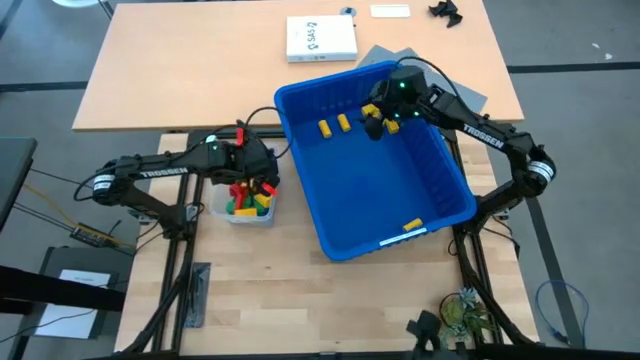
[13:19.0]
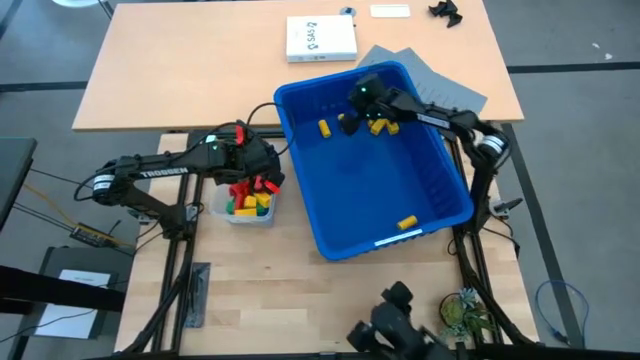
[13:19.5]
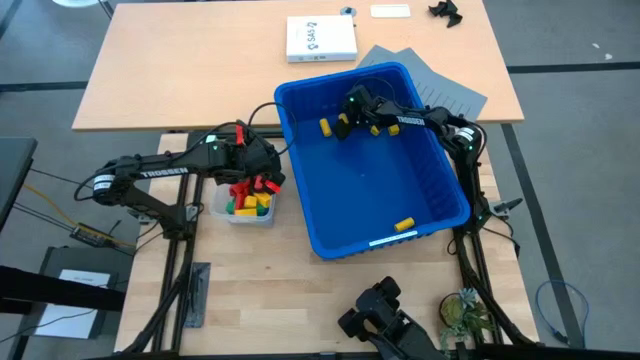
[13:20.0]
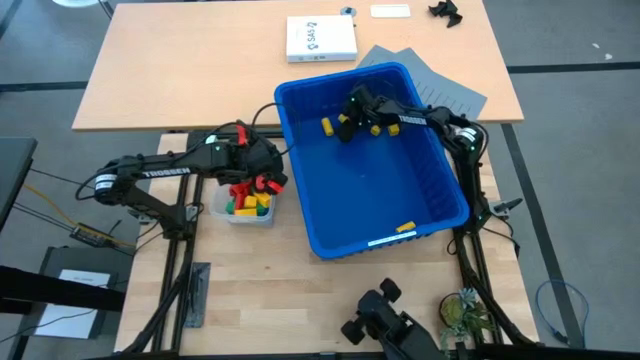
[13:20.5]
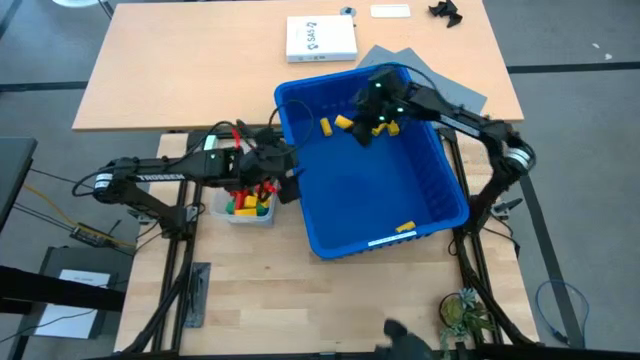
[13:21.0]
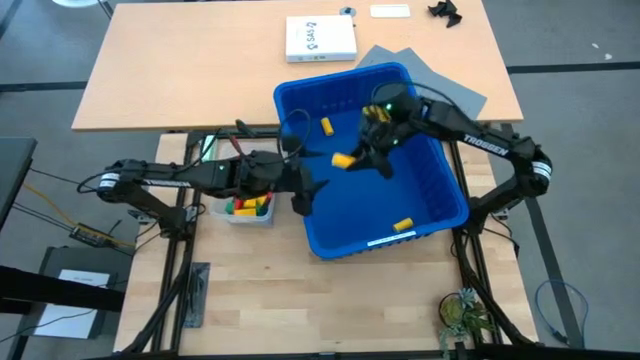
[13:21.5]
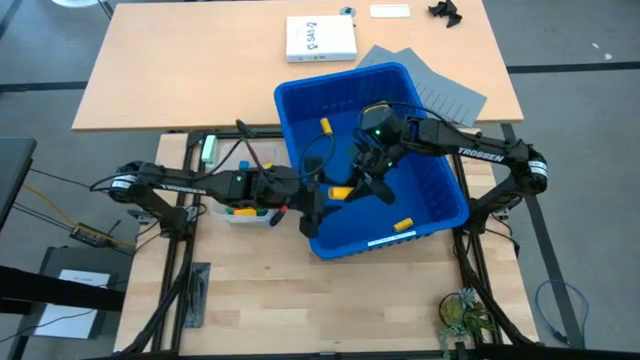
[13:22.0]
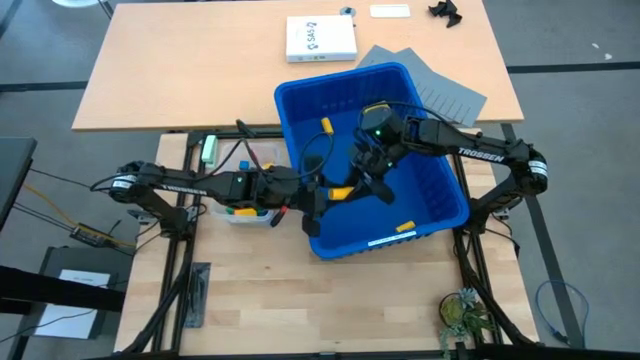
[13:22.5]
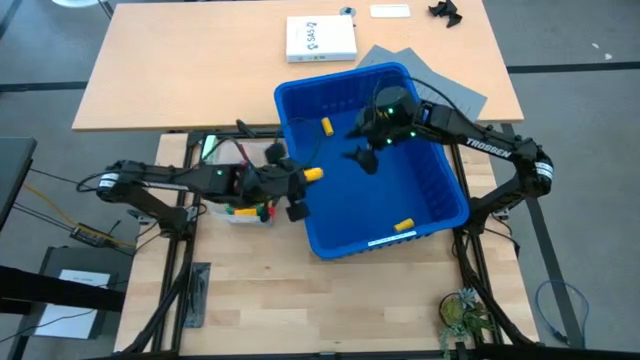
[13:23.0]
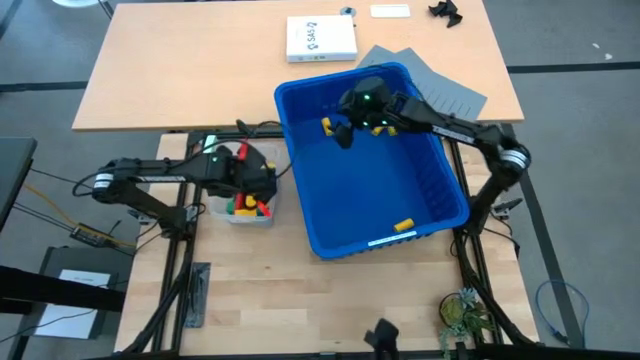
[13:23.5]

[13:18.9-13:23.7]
Task: Sort blocks
Put the yellow block into the transparent bin

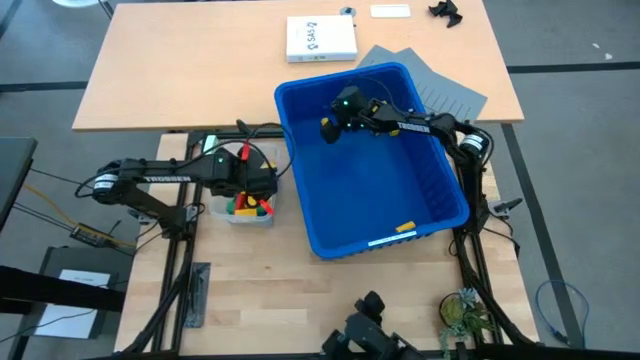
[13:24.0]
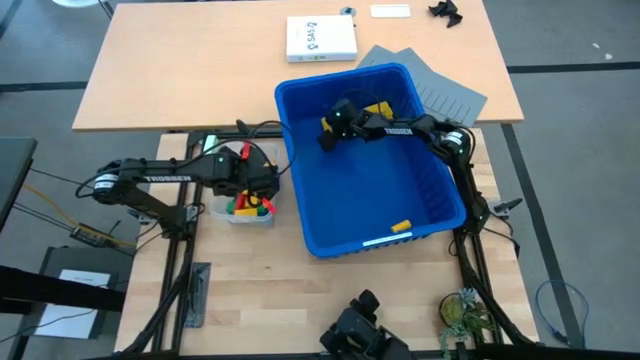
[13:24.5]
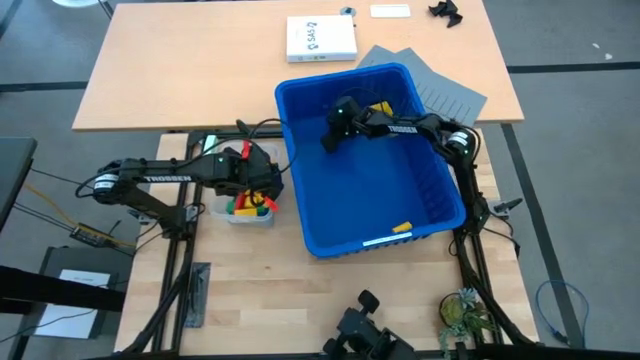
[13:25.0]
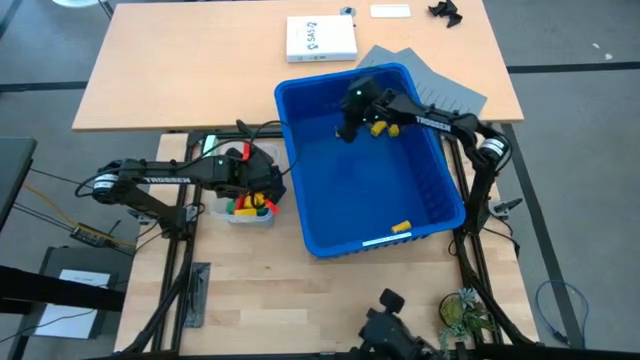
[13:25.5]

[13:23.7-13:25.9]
Put the yellow block into the transparent bin

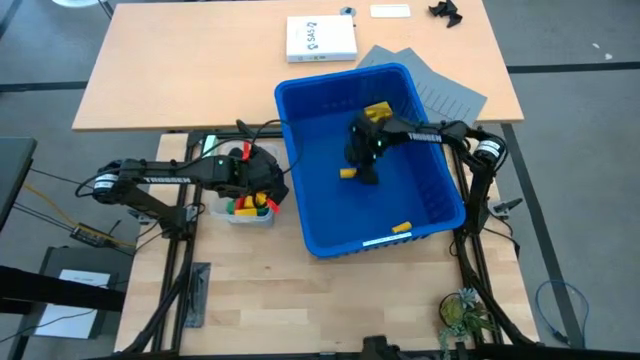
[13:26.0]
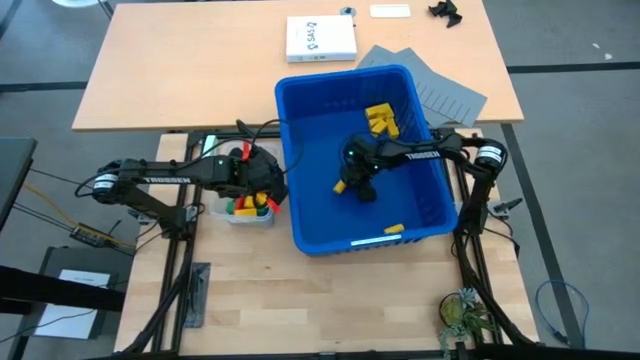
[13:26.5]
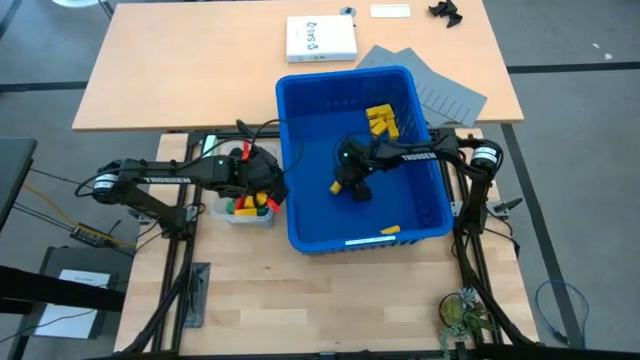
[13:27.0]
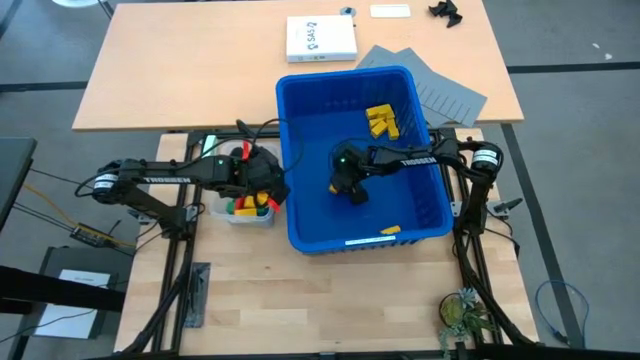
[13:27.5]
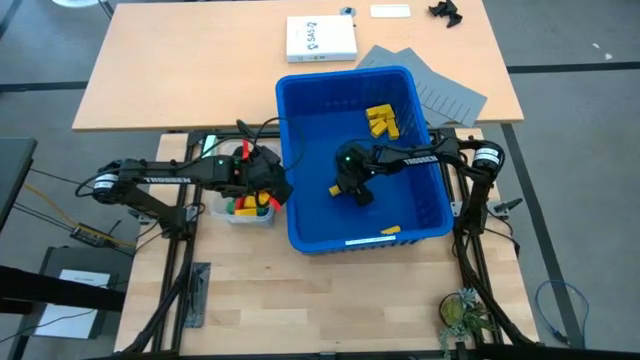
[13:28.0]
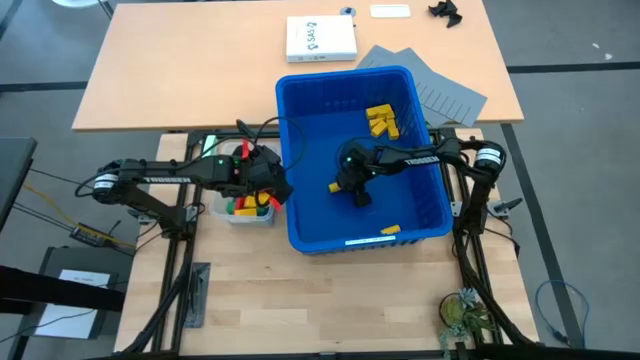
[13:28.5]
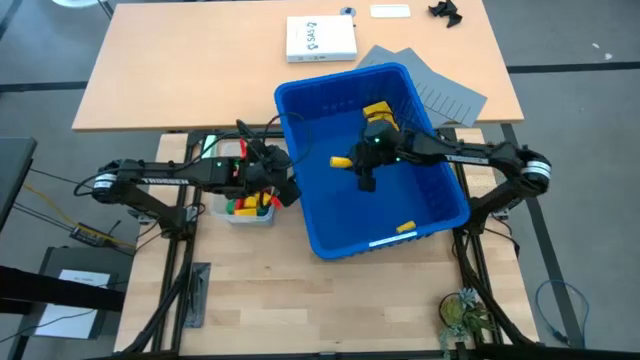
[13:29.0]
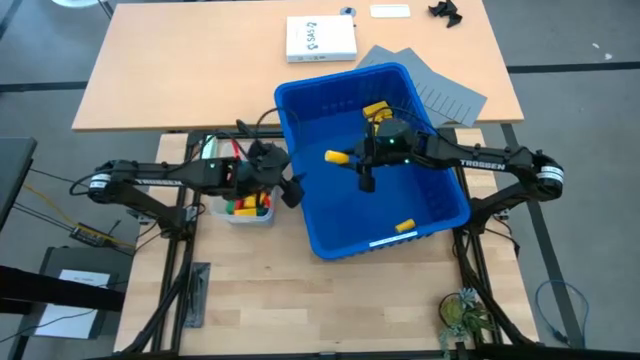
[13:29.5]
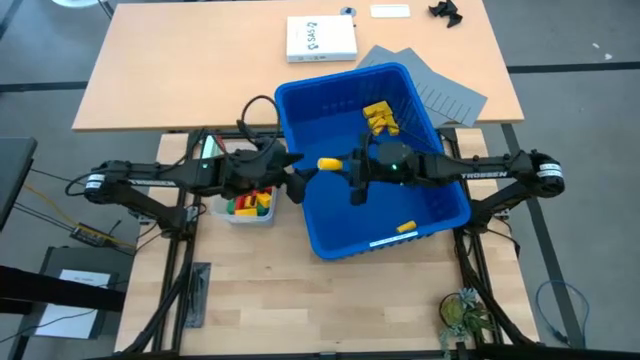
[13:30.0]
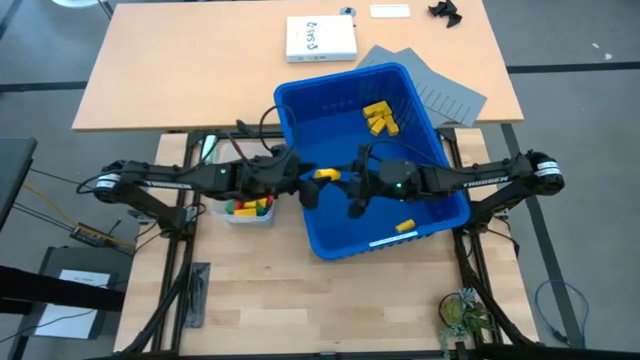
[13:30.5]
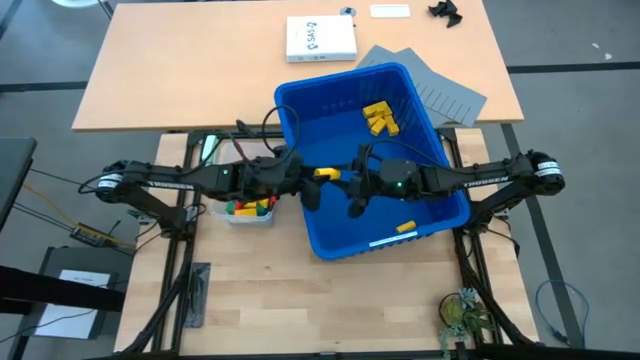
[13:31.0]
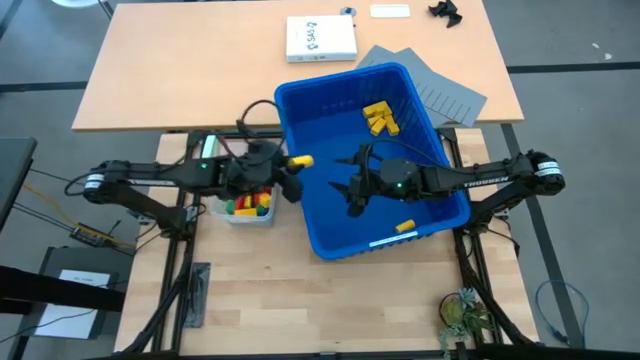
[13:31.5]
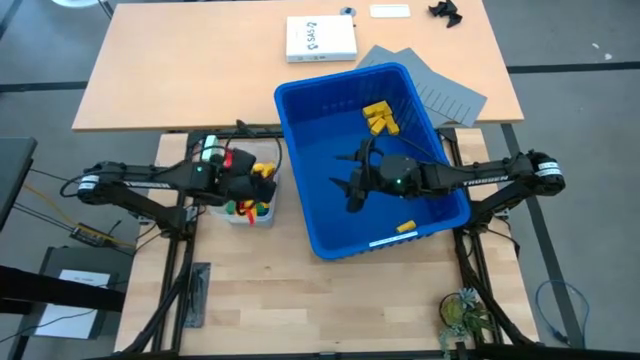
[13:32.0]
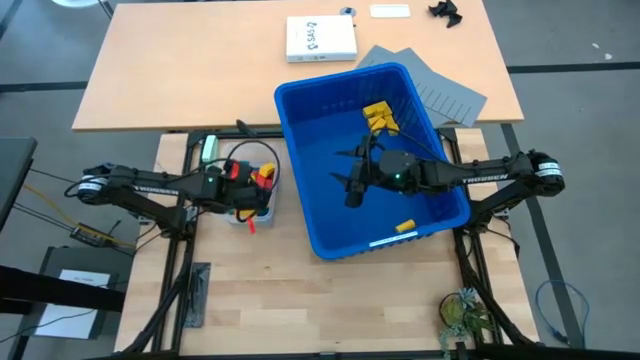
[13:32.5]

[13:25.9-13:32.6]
Put the yellow block into the transparent bin

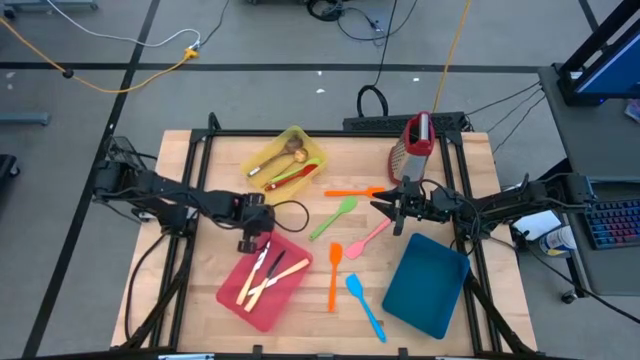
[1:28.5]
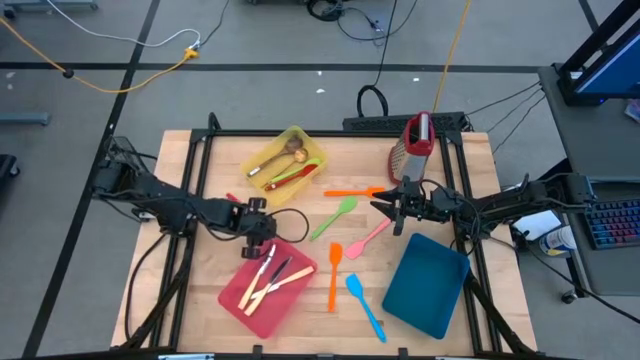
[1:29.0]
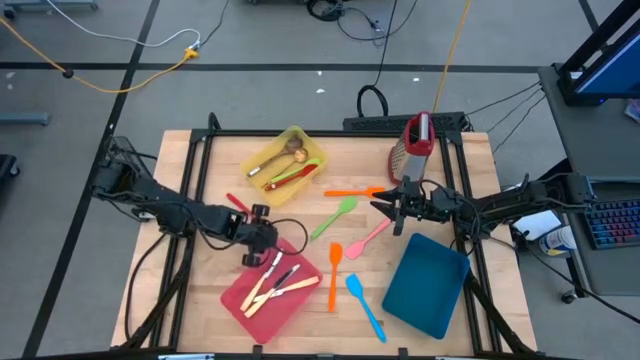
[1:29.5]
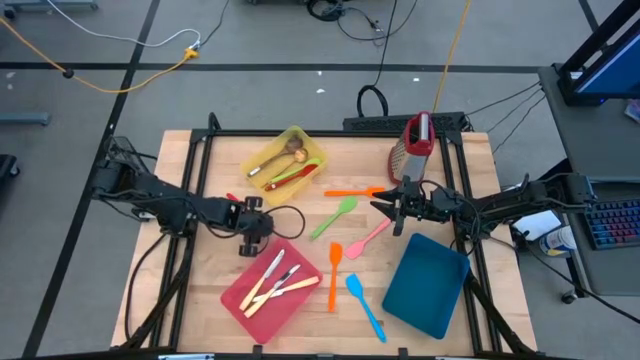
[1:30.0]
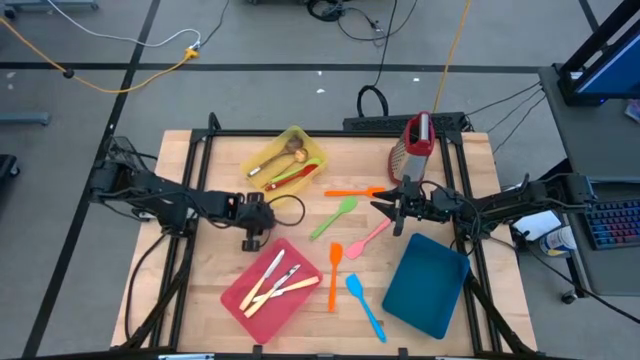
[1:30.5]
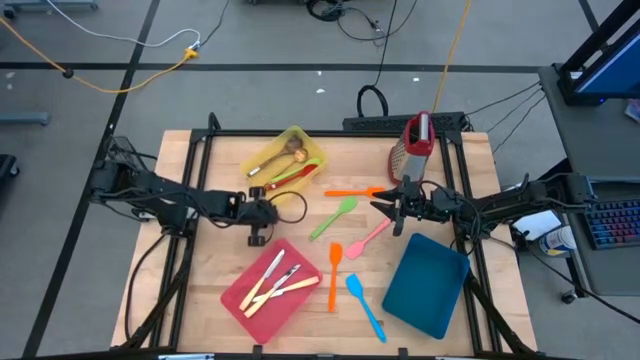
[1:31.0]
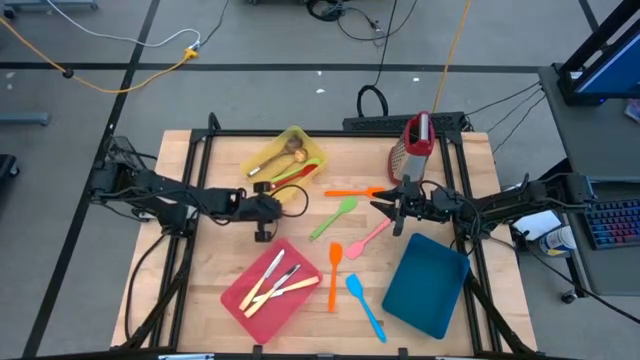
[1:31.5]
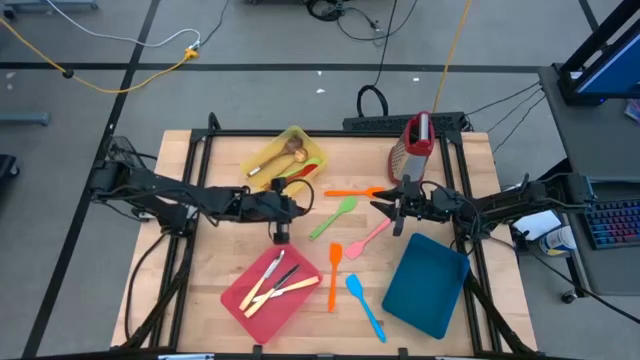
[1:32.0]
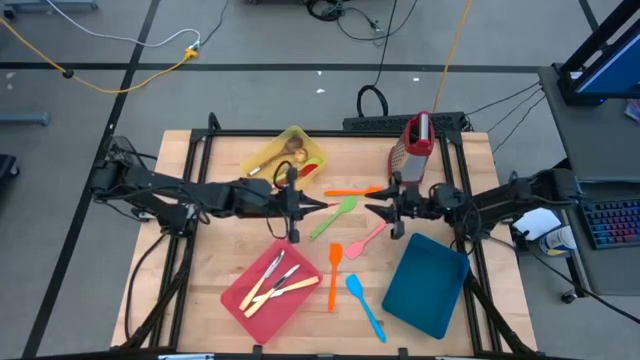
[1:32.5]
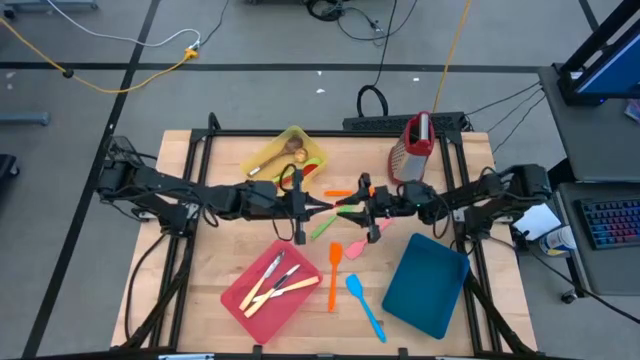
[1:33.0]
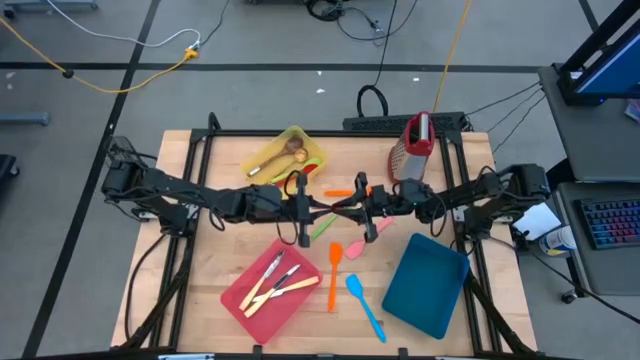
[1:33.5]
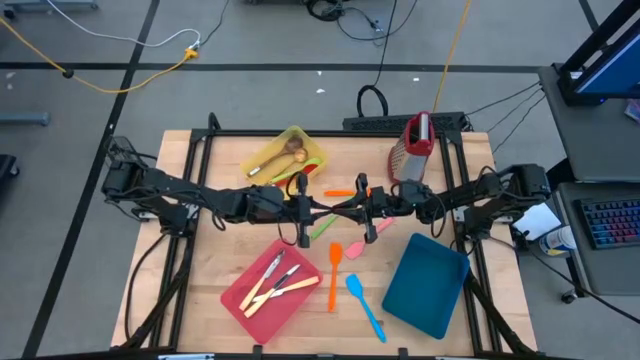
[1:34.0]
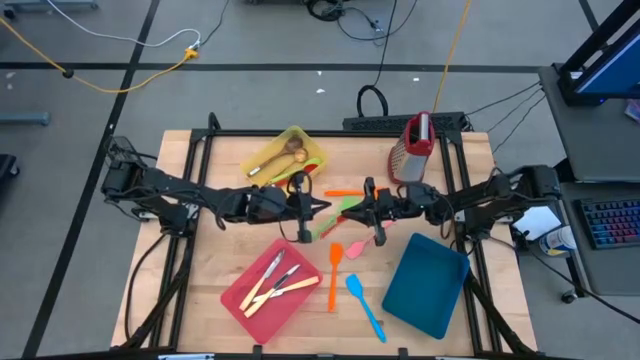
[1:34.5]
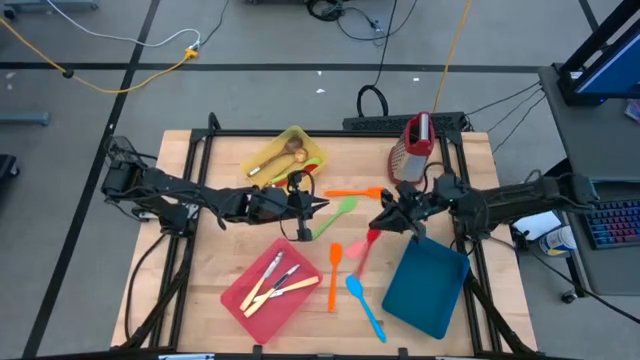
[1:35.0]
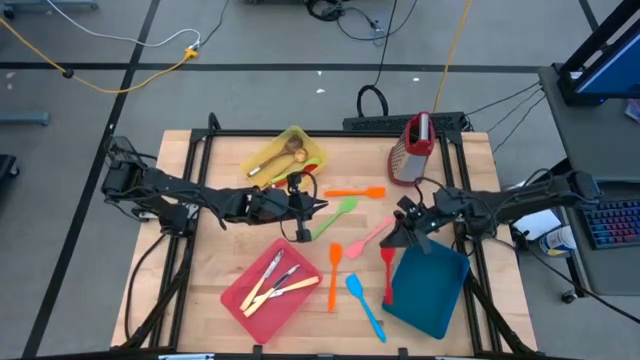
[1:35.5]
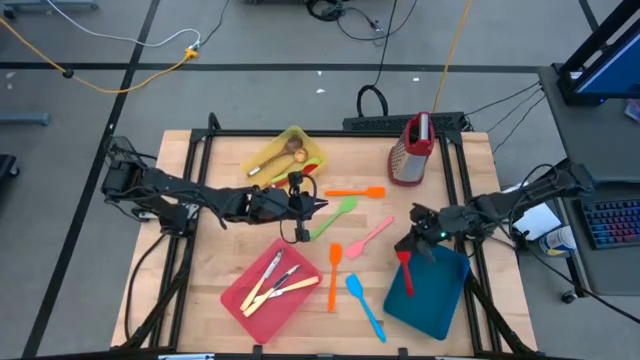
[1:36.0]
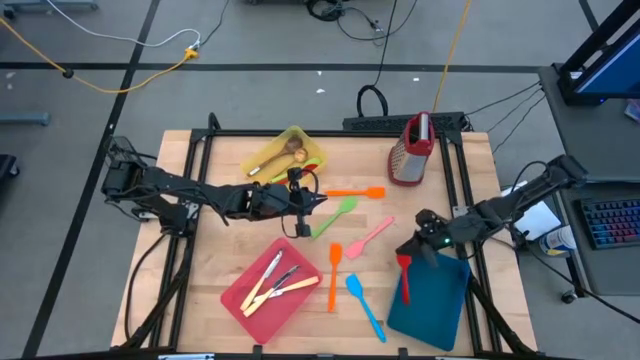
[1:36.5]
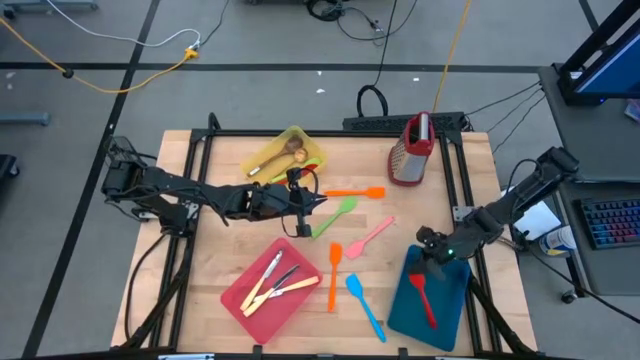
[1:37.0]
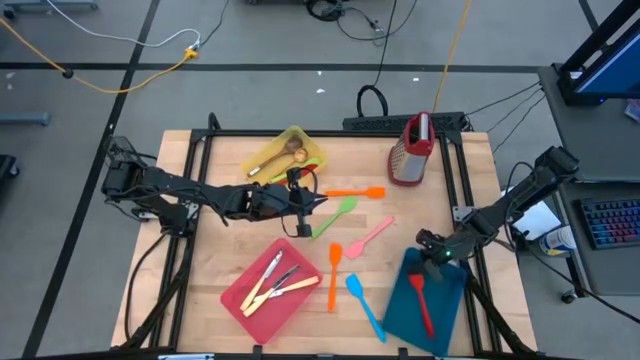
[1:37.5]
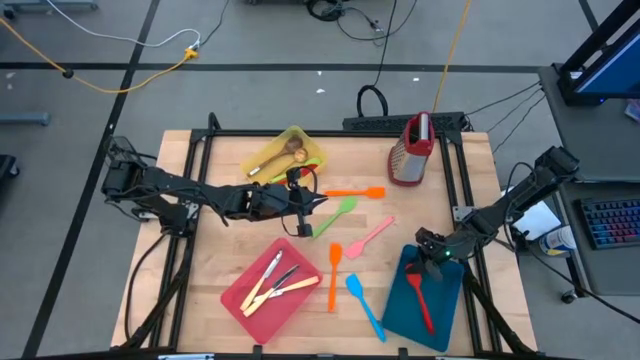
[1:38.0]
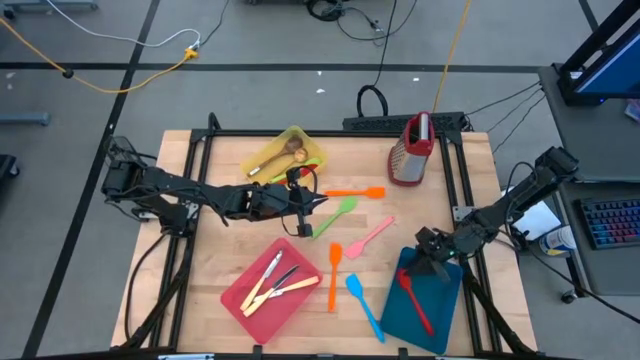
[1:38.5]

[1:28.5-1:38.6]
Task: Pick & Place Kitchen Items
Put the red spatula into the blue bin
